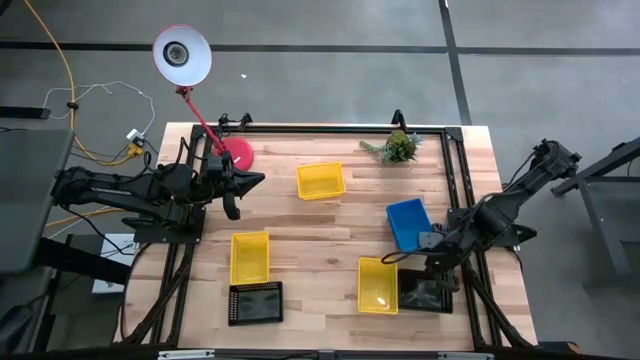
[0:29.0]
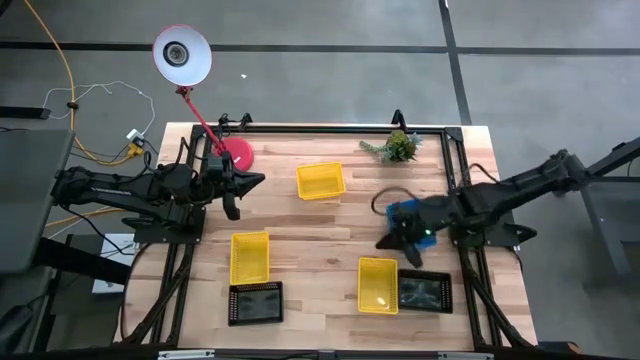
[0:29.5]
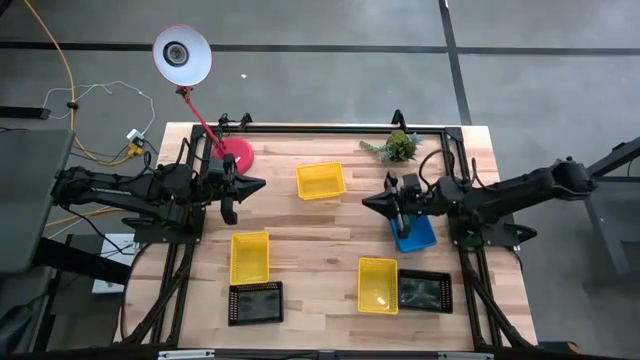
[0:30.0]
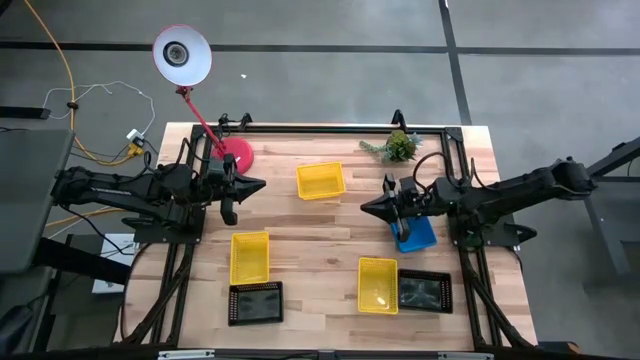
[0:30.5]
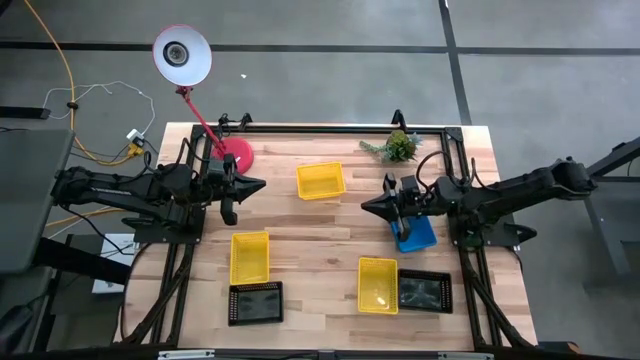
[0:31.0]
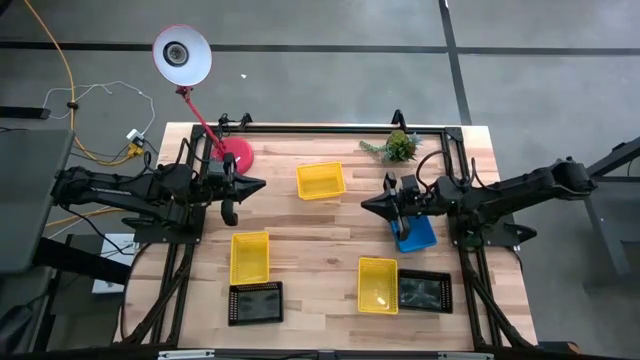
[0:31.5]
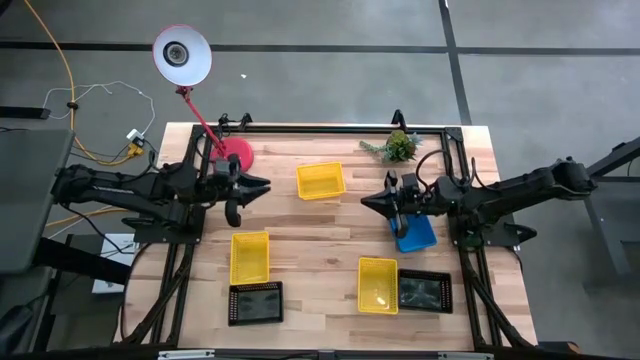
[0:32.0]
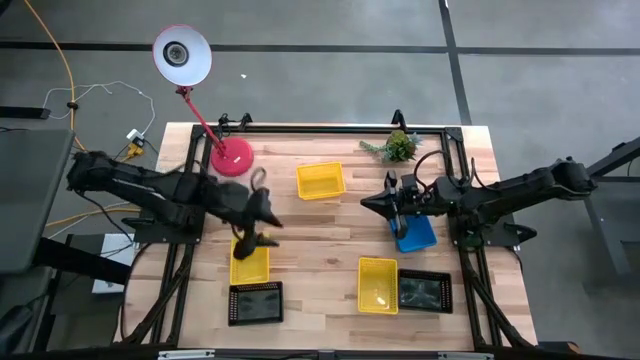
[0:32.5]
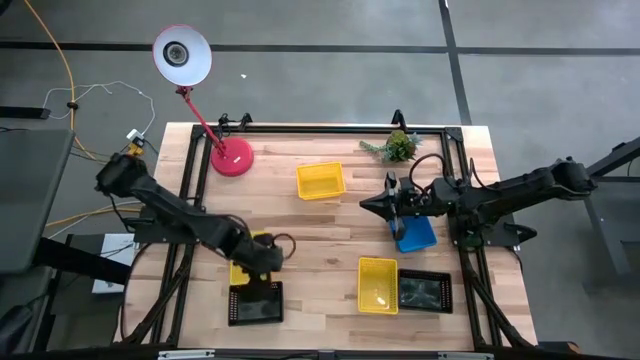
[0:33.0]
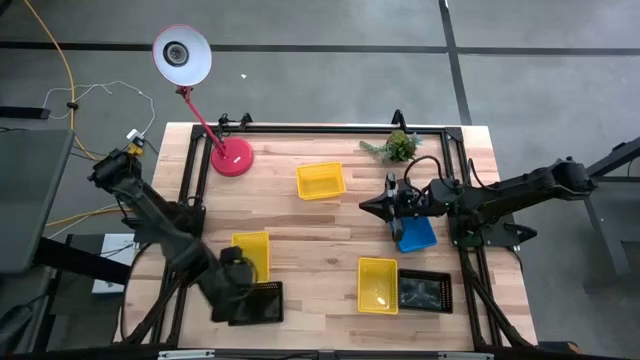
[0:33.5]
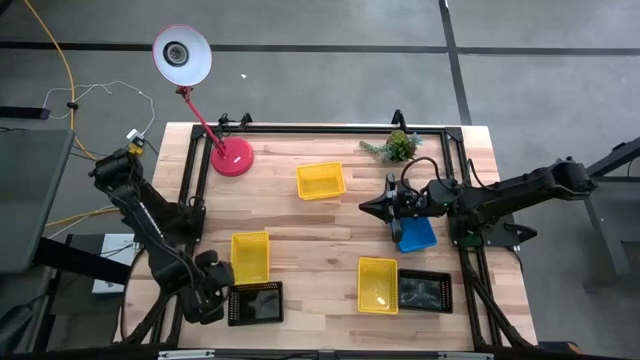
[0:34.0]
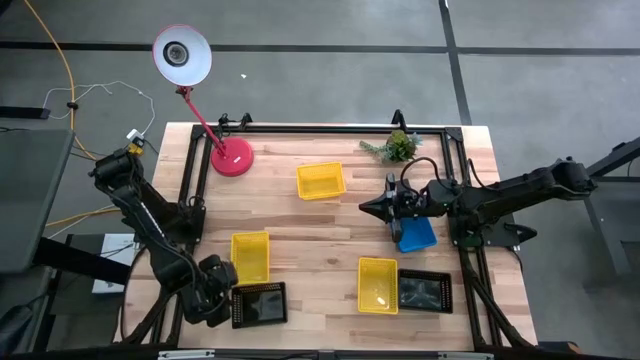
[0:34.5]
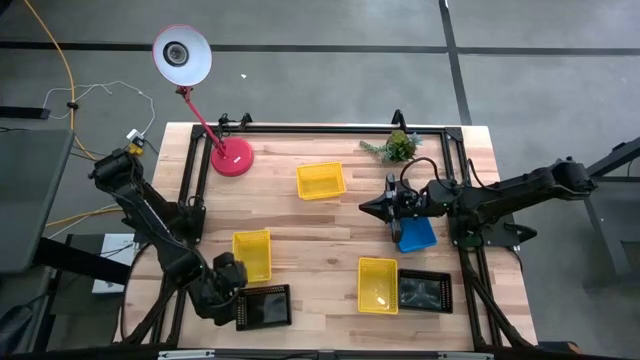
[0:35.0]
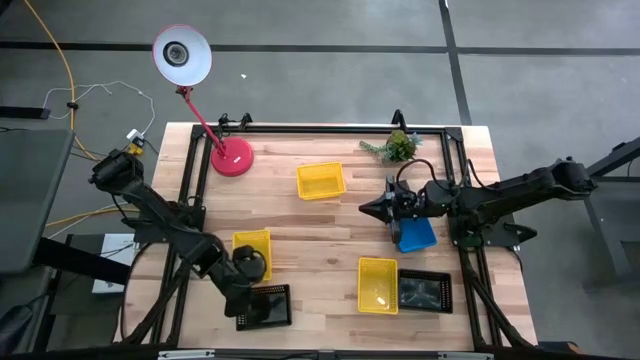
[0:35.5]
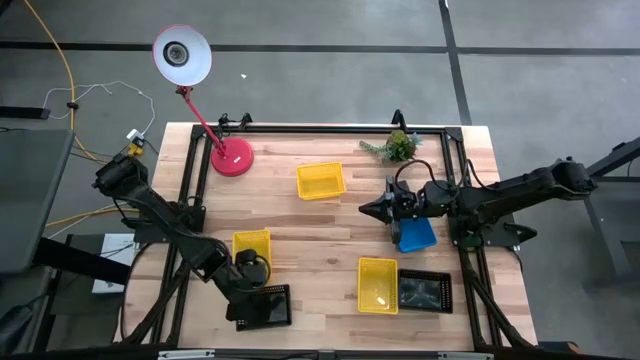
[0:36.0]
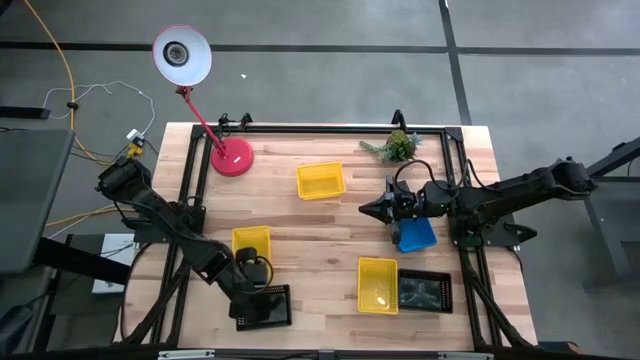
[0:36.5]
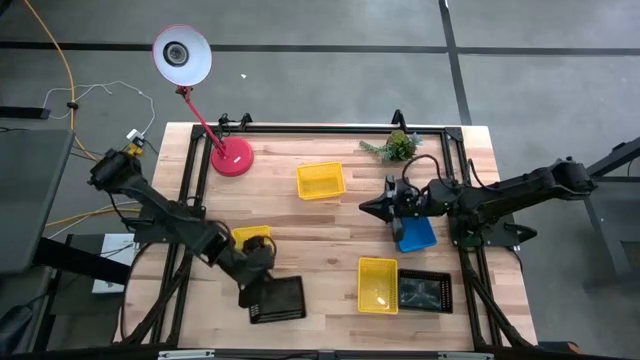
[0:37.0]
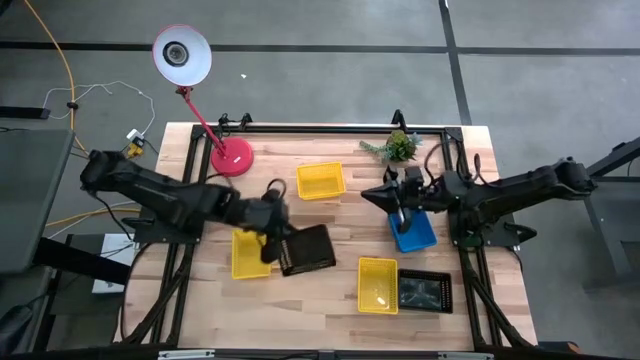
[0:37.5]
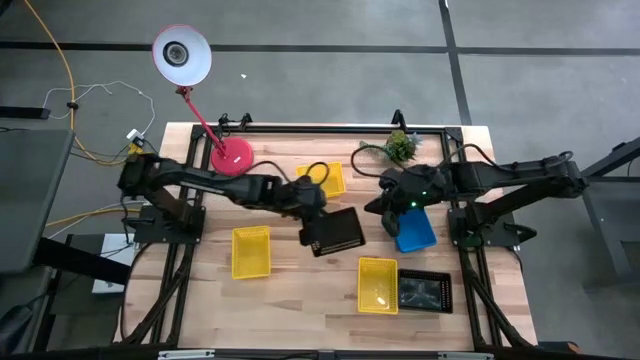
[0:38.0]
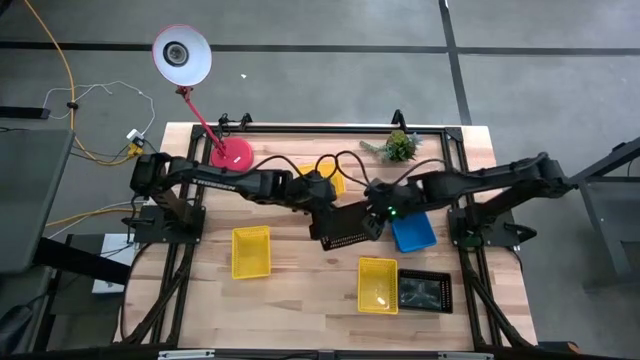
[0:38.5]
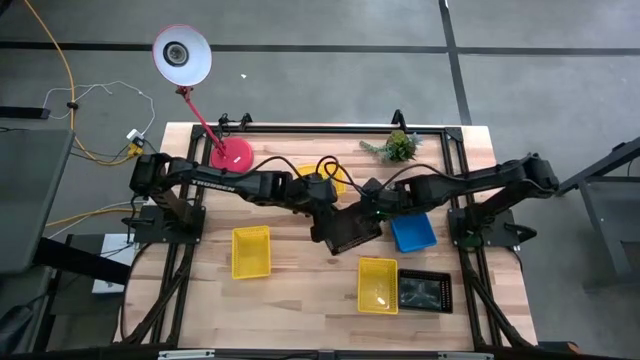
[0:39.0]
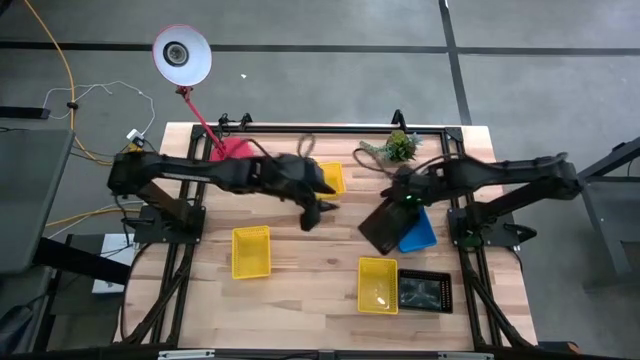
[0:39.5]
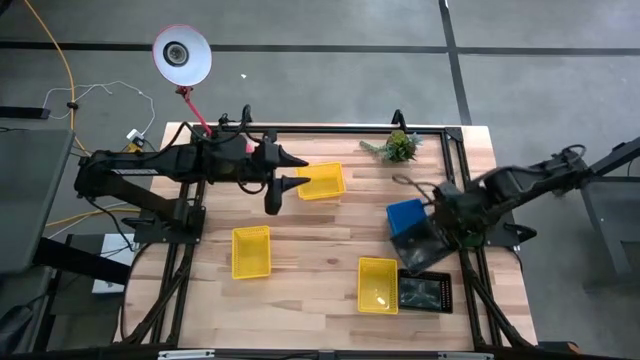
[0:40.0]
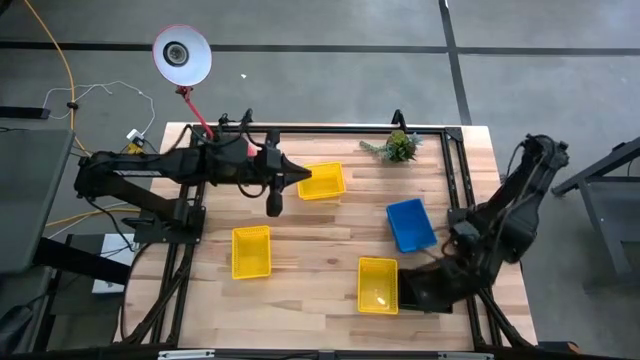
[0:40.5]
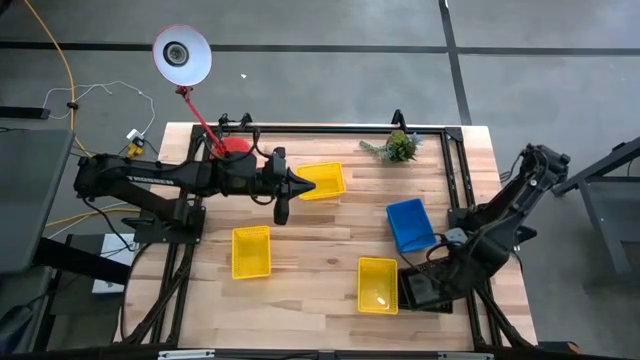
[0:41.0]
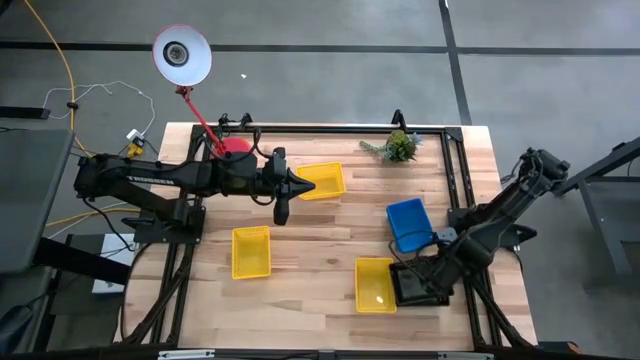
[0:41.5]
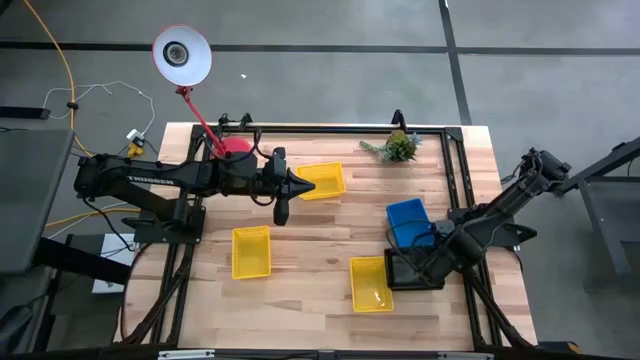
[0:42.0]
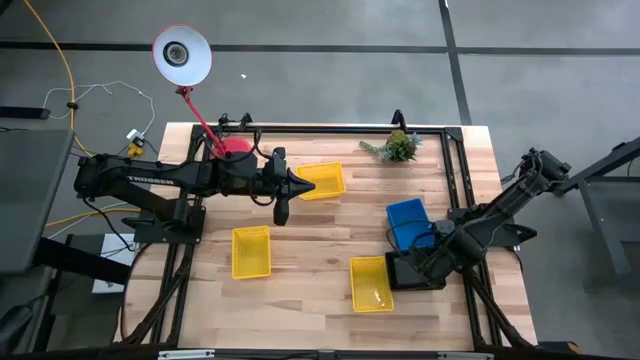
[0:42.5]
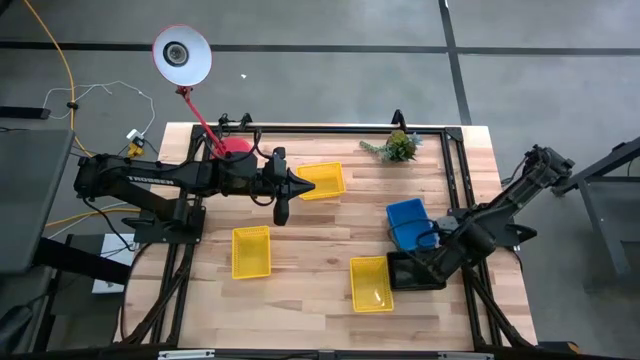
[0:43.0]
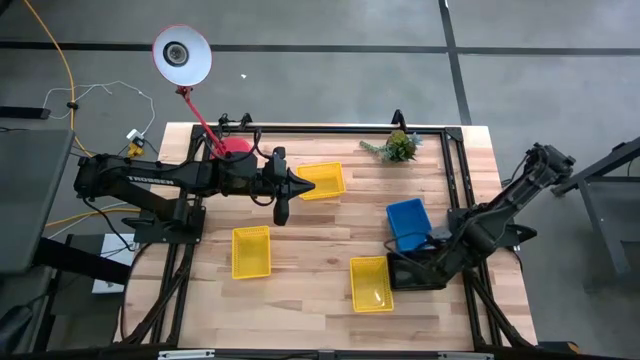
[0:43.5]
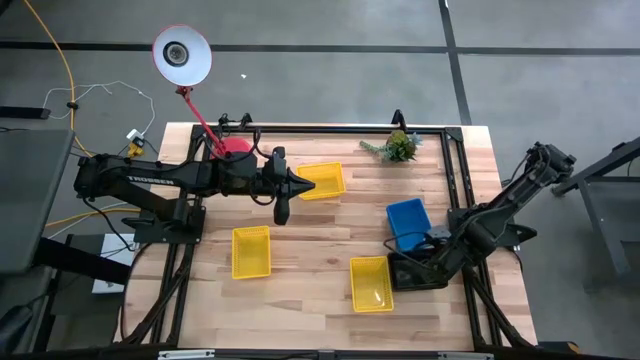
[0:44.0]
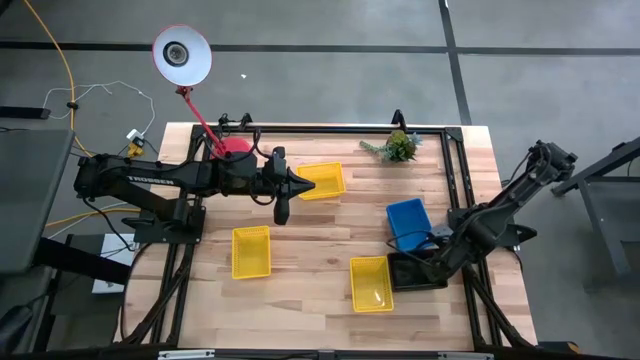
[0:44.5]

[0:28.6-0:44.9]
Stack the left black bin on the right stacked black bin

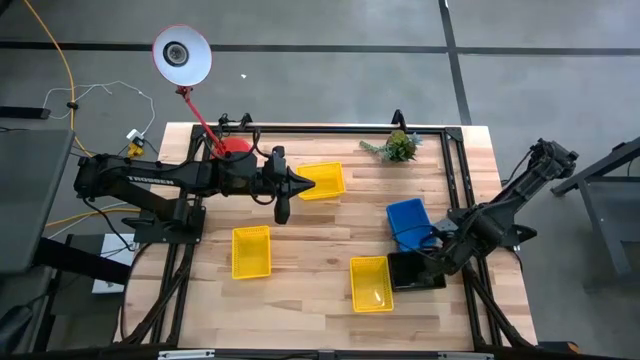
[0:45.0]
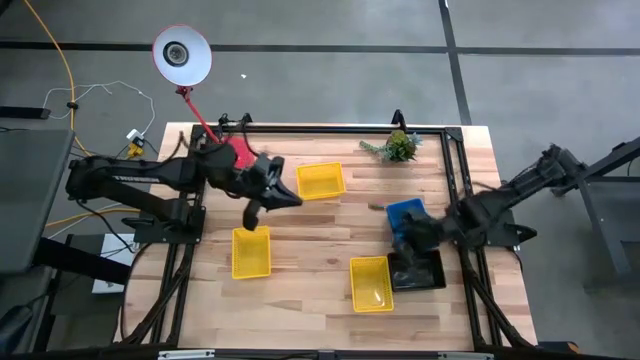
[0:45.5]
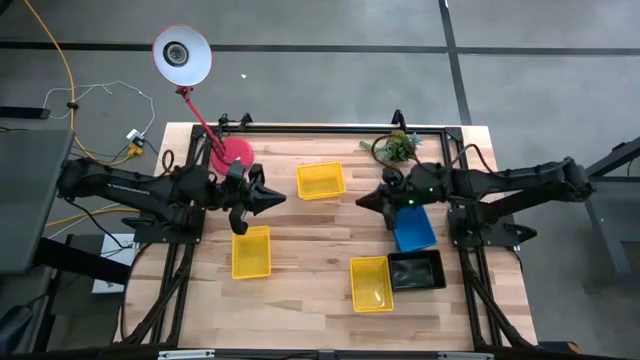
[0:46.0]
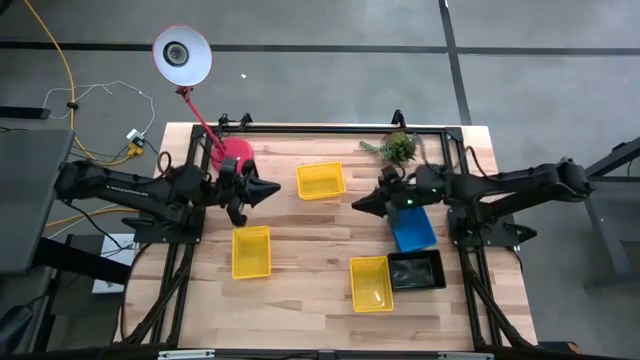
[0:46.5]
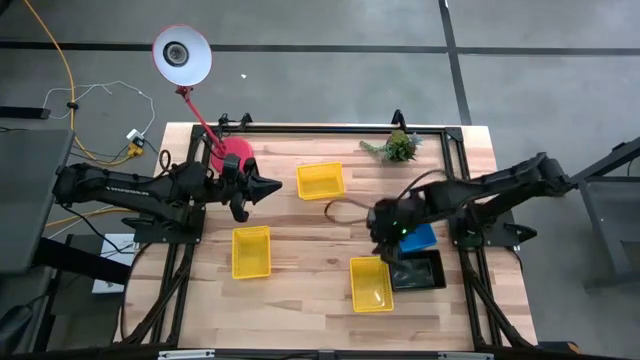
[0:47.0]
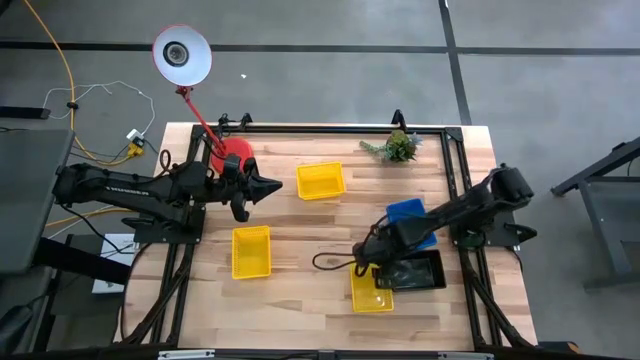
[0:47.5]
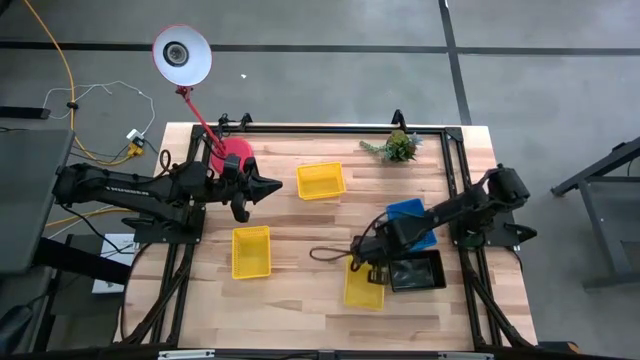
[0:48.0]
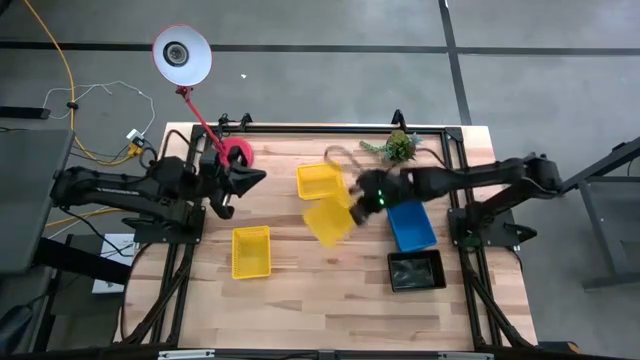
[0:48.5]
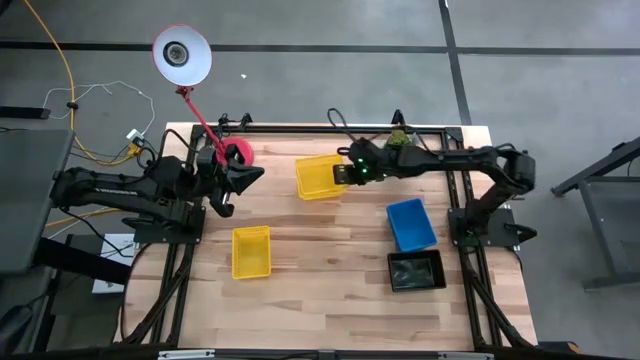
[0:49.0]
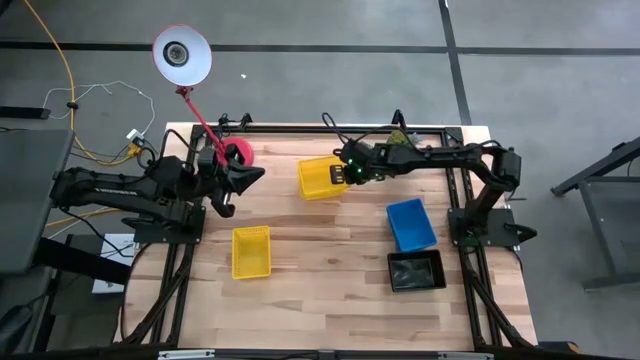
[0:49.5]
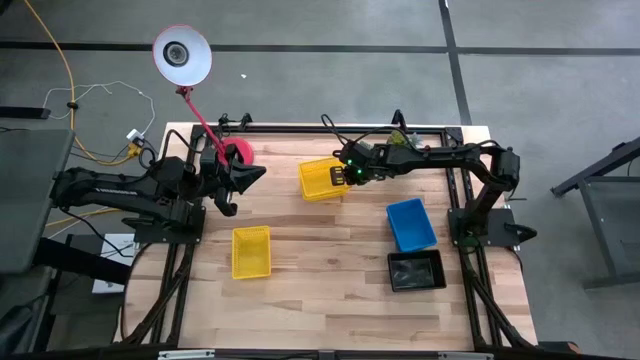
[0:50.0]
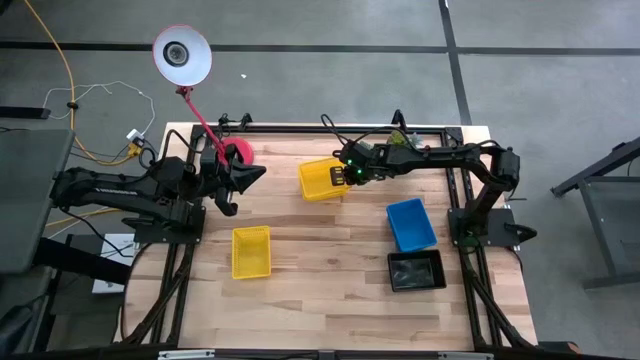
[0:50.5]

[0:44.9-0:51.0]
Stack the bottom yellow bin on the top yellow bin
